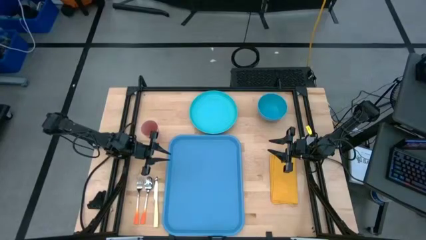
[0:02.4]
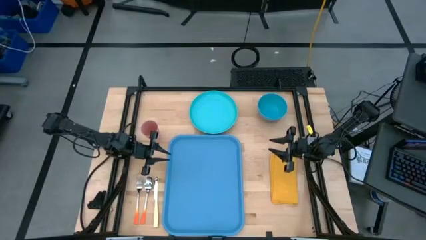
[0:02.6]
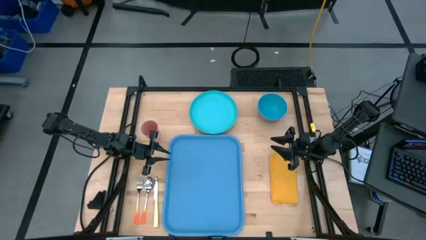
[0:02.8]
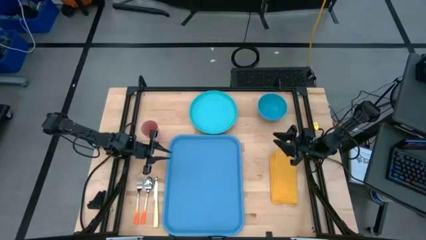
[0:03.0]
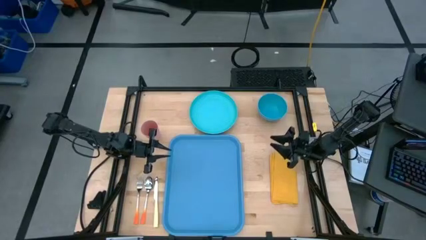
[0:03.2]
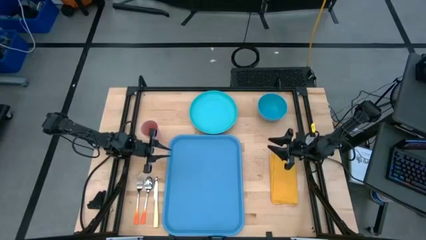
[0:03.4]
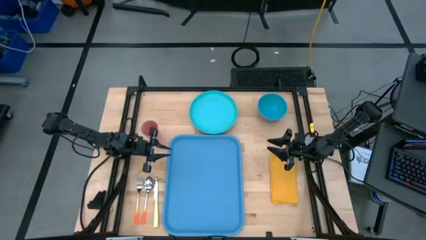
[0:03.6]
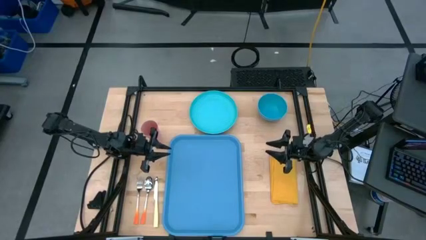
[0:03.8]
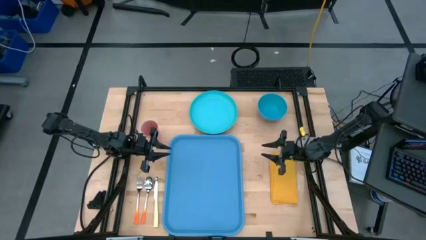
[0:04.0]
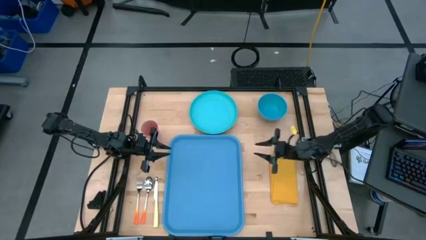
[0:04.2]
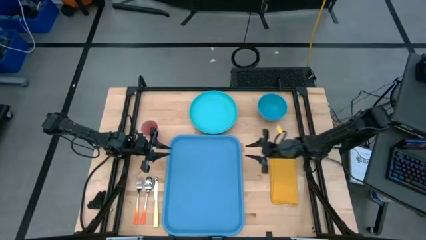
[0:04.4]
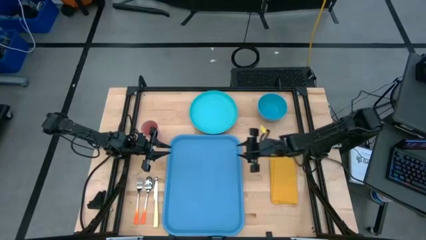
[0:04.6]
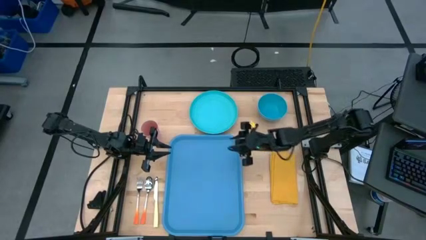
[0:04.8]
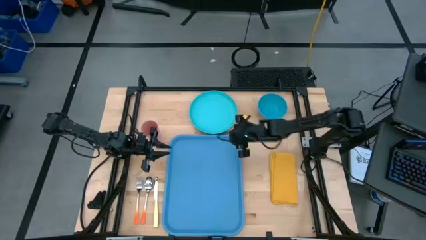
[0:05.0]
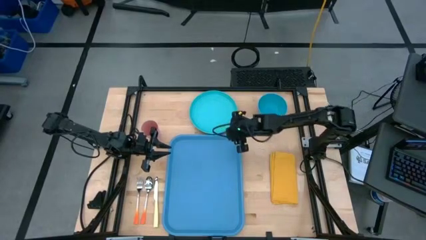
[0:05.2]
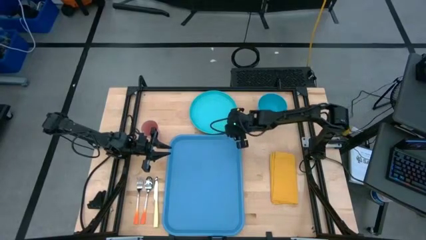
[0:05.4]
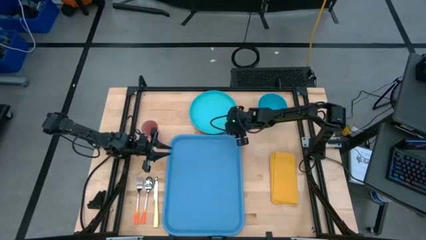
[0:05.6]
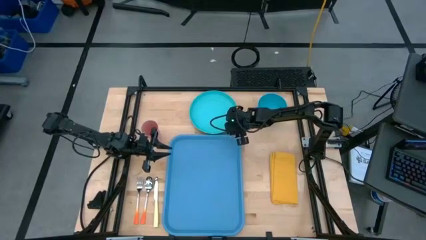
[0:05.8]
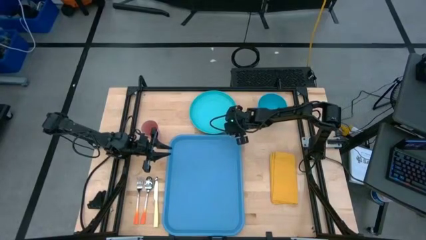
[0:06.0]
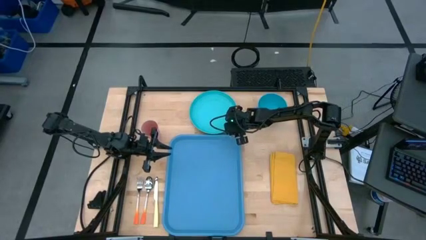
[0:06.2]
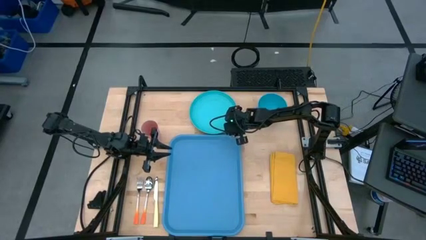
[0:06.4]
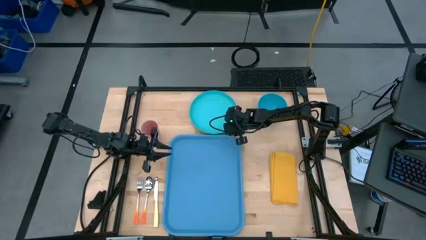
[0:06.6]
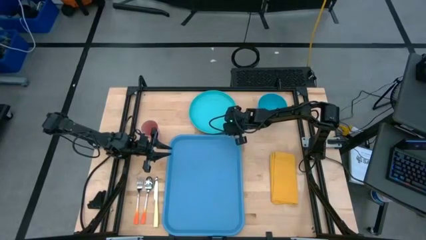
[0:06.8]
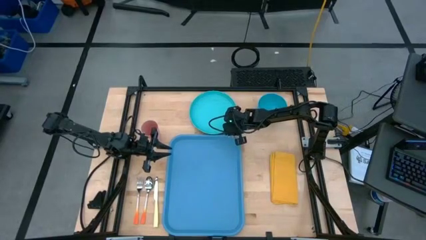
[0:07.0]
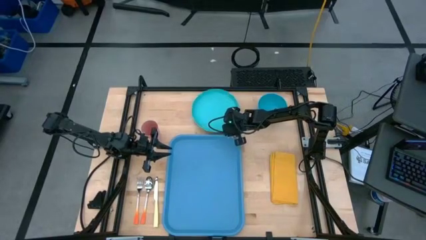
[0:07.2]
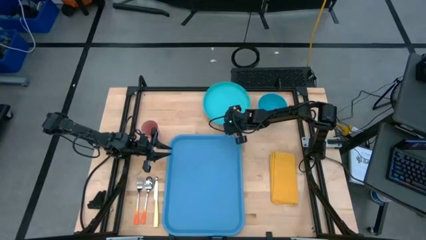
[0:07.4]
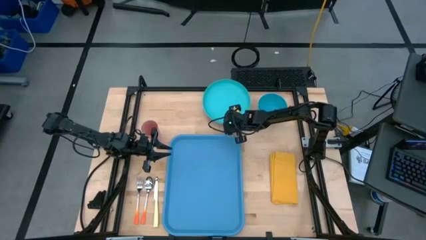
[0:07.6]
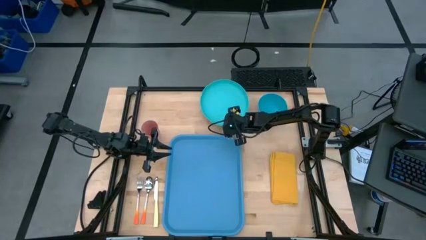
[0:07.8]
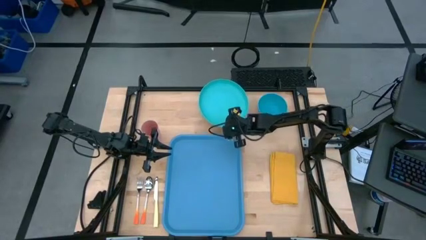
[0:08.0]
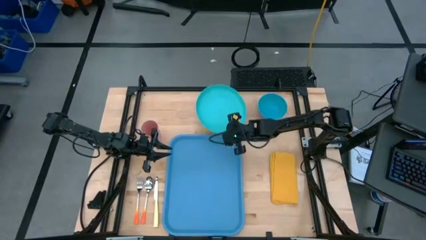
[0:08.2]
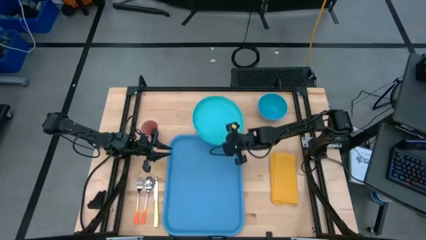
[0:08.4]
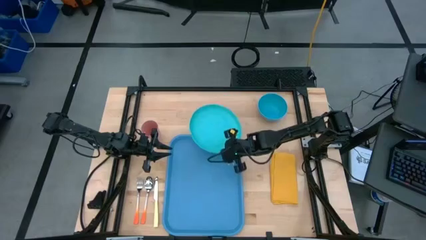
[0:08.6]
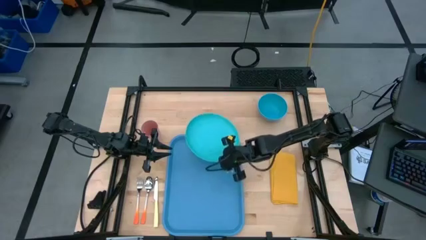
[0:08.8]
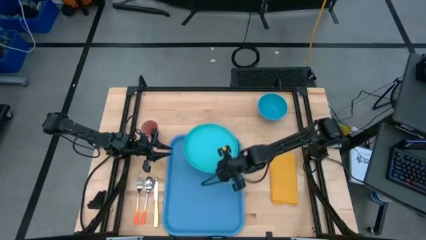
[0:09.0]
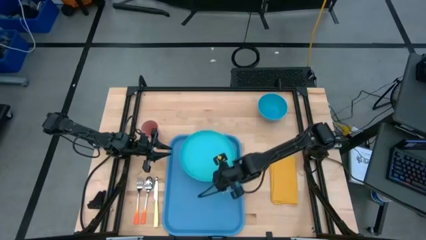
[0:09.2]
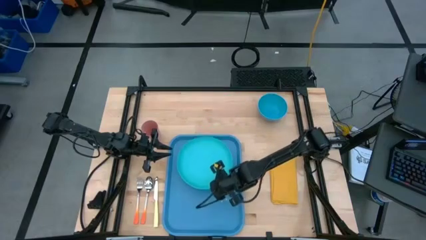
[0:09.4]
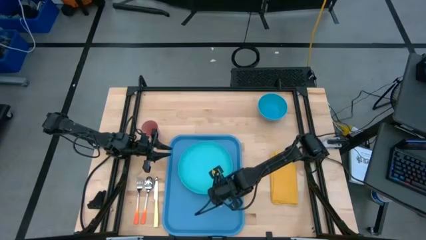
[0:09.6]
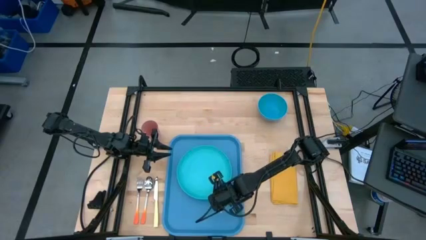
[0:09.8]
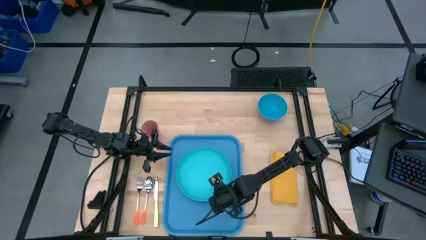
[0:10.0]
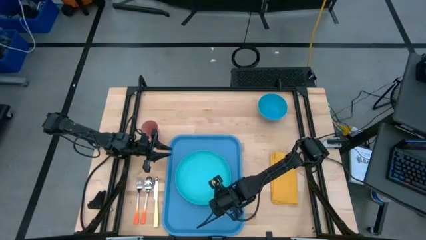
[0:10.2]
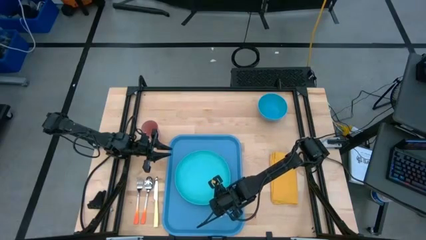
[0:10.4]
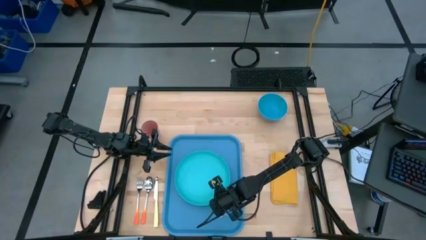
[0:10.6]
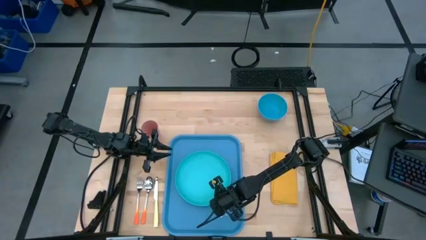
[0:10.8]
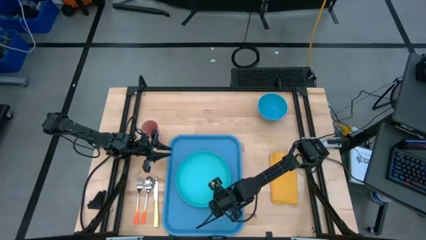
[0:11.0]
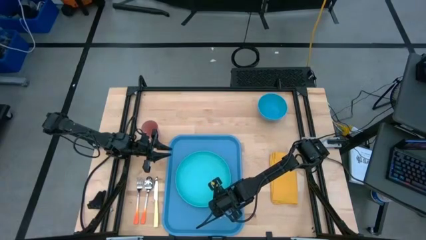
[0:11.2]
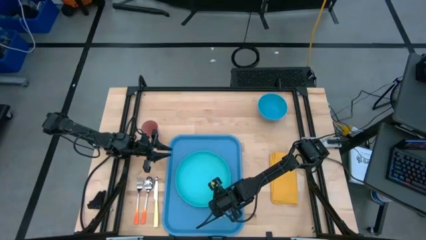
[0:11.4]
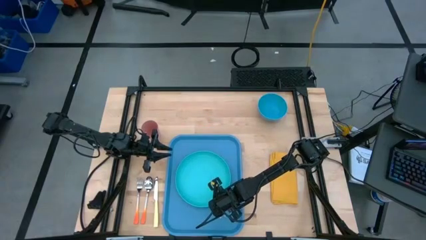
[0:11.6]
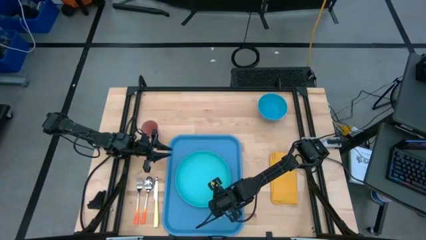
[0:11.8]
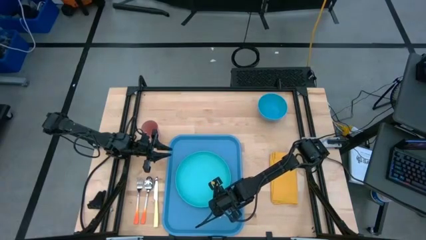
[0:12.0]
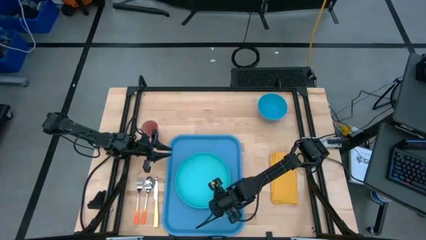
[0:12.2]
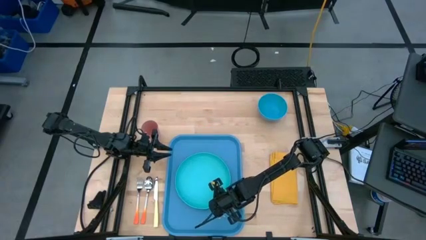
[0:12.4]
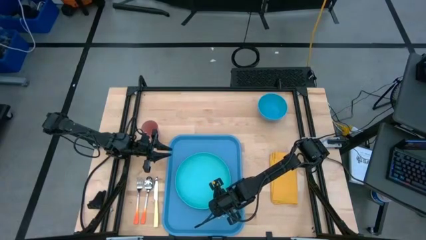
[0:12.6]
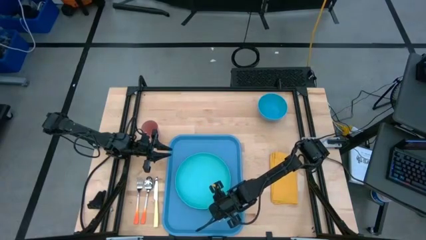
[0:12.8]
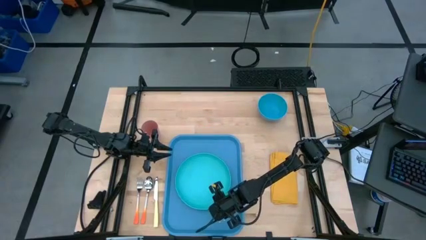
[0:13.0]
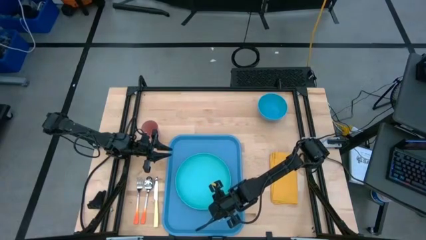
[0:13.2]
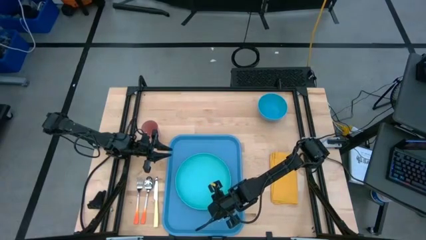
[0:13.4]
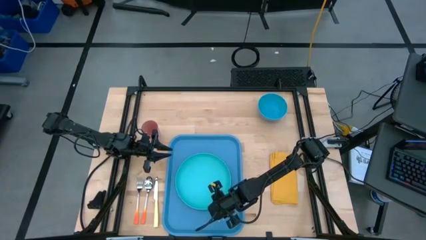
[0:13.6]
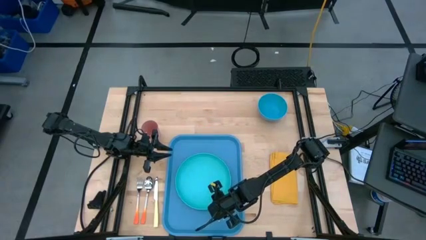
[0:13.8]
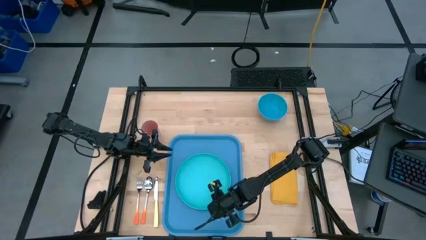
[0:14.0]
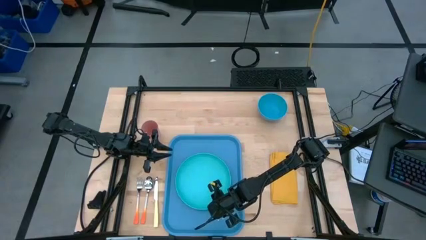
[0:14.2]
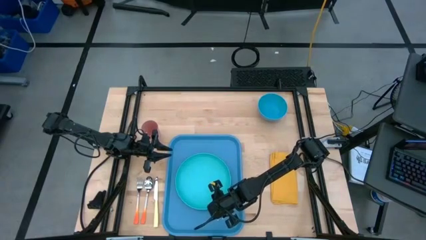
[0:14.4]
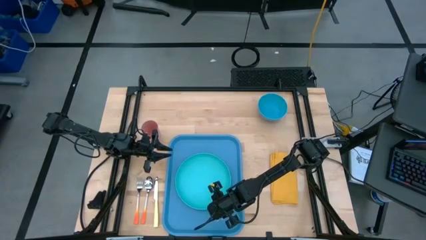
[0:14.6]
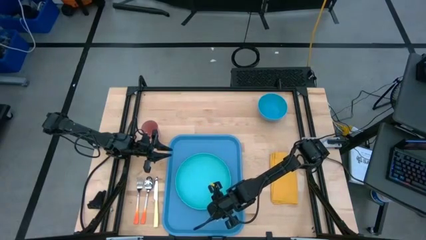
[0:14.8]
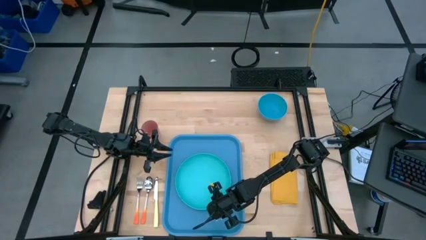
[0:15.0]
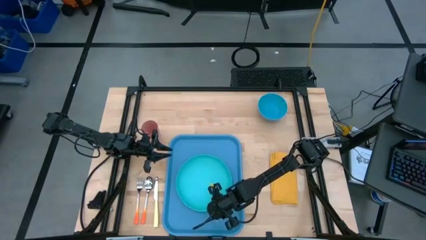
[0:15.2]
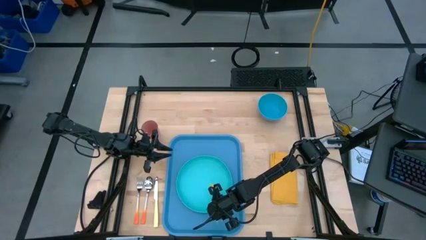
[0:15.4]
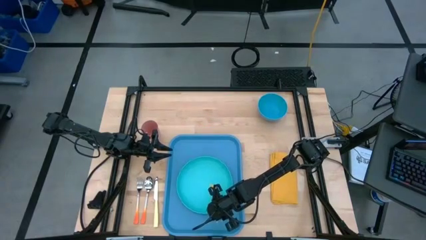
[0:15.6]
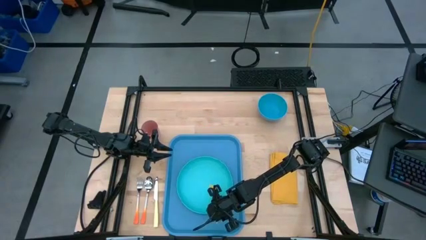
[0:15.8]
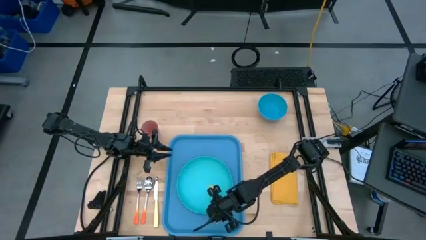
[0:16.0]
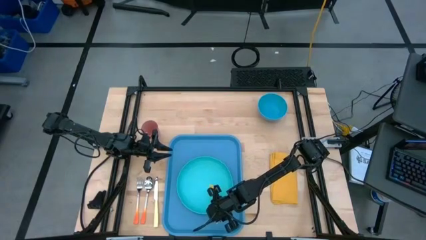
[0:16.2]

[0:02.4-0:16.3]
Task: Set up tray
Put the blue plate on the blue serving tray

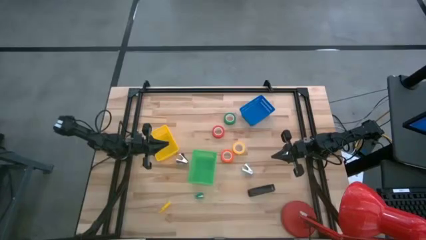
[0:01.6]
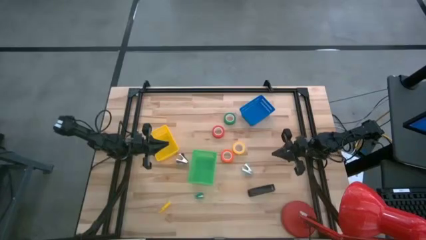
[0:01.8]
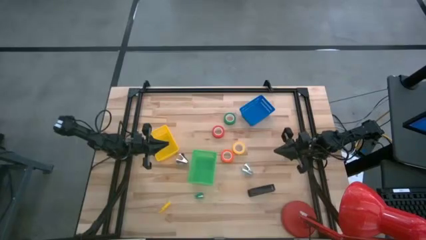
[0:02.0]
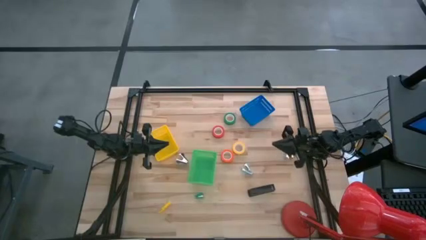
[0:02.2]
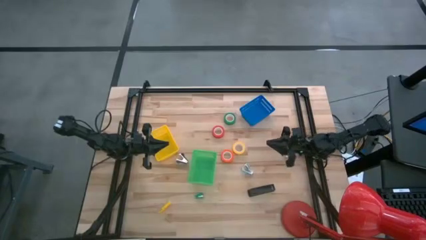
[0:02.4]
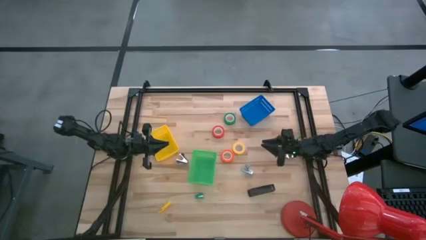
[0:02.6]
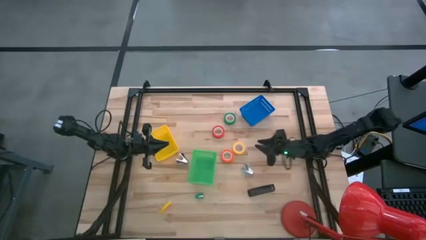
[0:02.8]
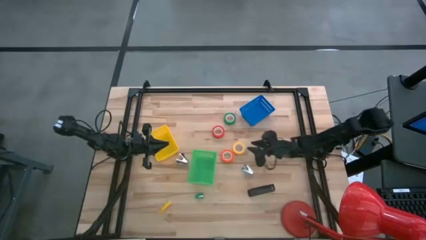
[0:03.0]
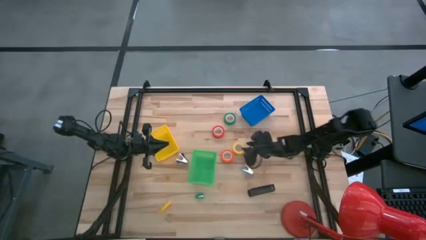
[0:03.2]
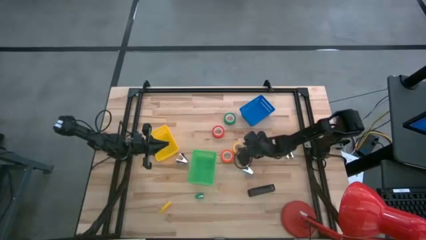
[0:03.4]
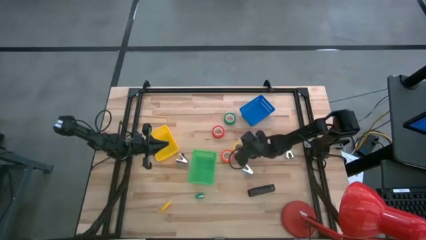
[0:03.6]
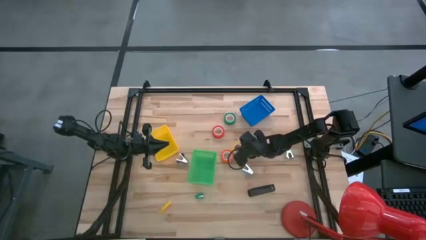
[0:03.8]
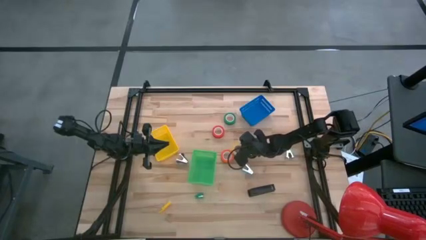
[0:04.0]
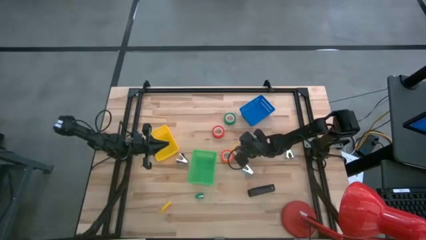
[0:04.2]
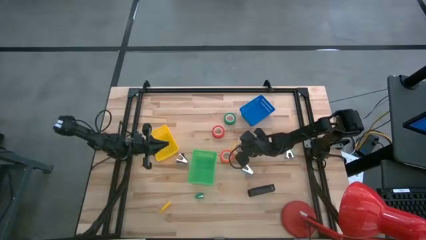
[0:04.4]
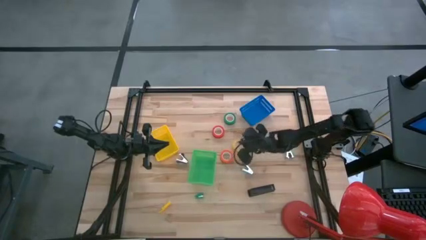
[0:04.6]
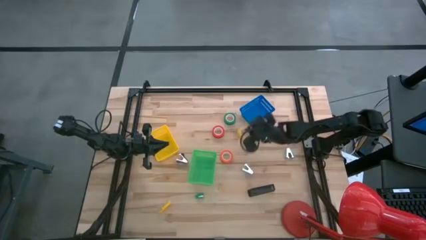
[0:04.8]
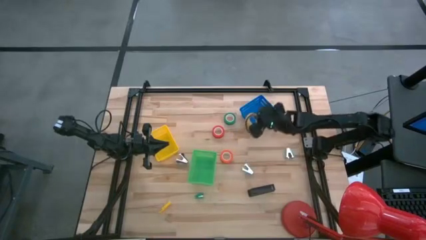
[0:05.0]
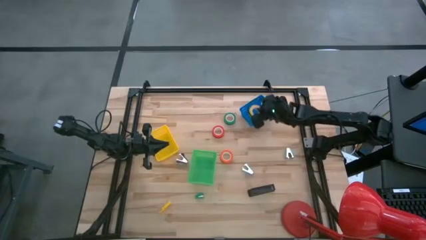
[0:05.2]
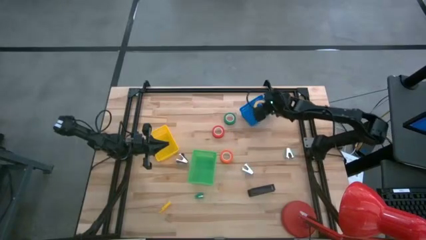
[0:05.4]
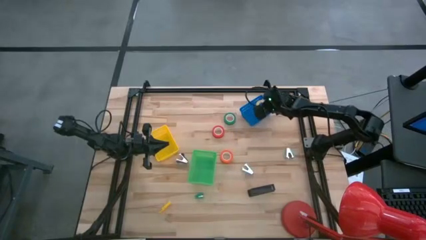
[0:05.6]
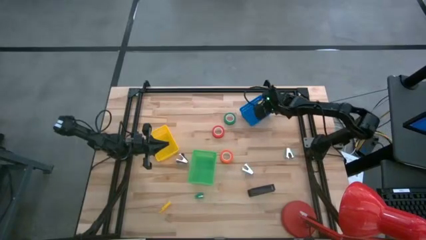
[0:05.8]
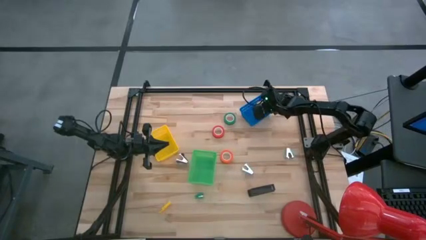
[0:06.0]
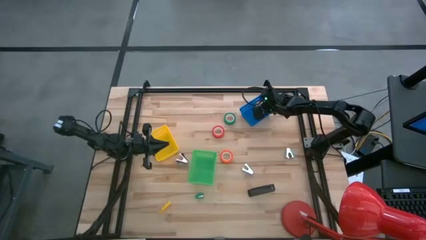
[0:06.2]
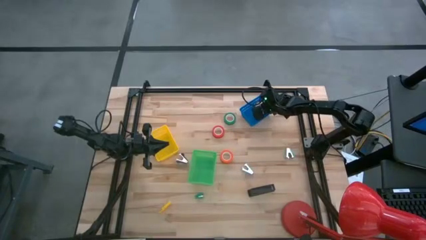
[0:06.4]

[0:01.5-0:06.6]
Task: Pick and place Stapler, Stapler remover, tape
Put the yellow tape into the blue bin
